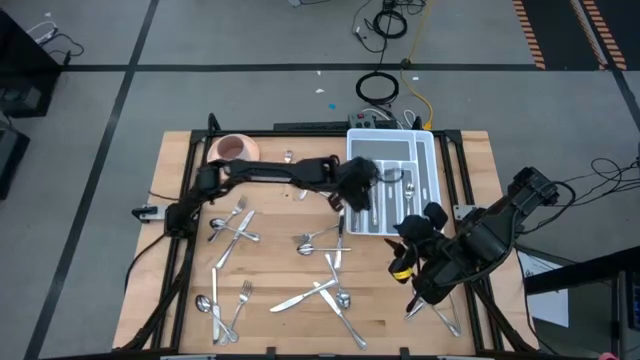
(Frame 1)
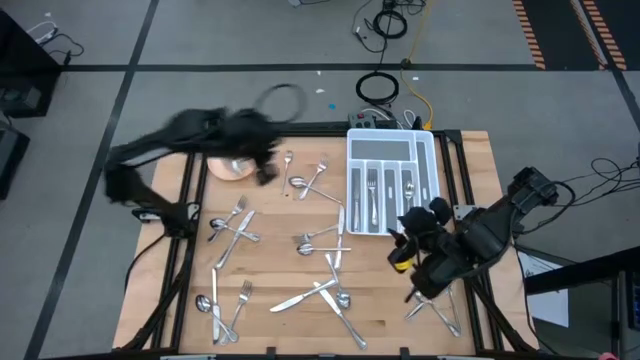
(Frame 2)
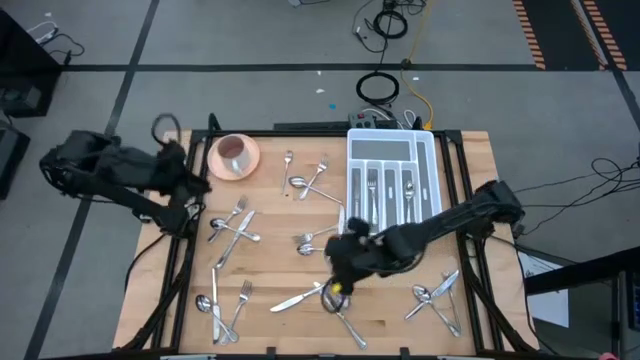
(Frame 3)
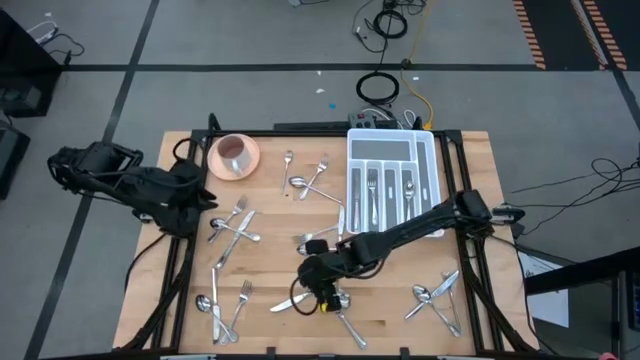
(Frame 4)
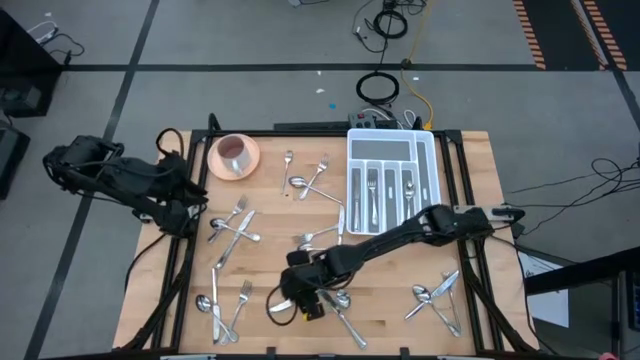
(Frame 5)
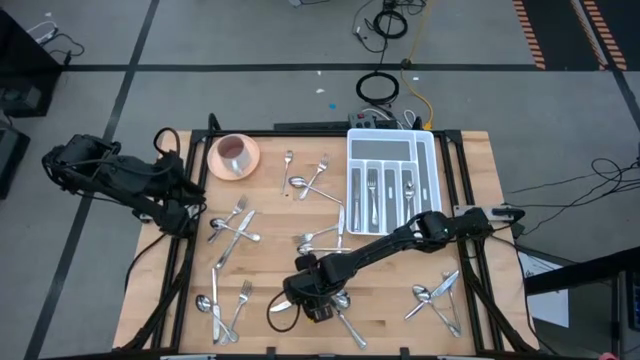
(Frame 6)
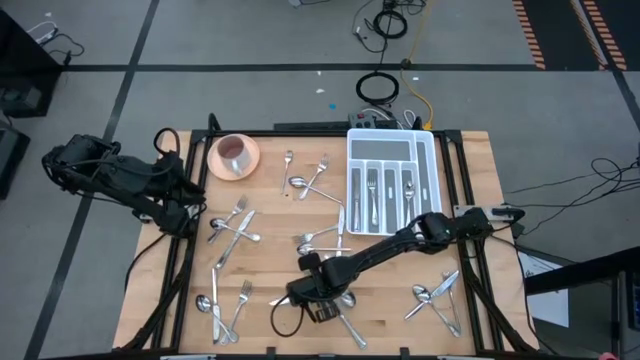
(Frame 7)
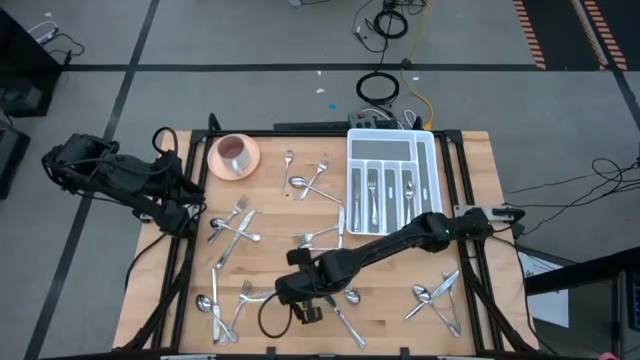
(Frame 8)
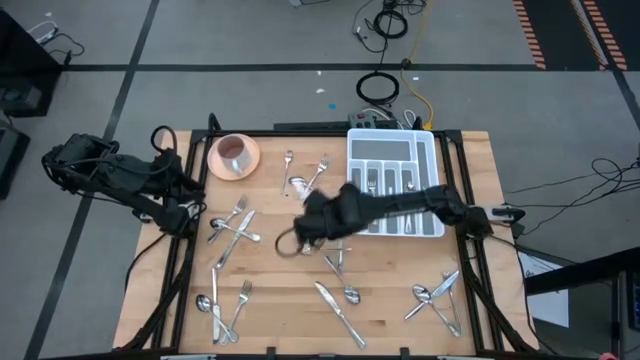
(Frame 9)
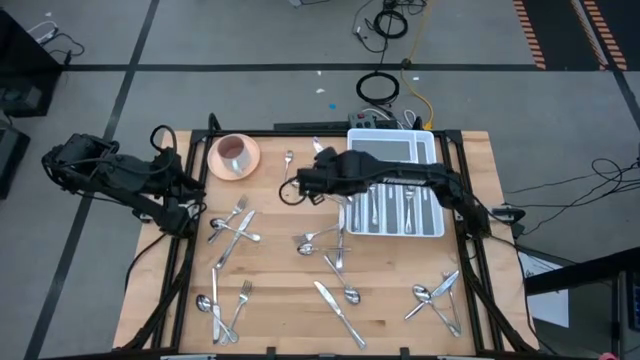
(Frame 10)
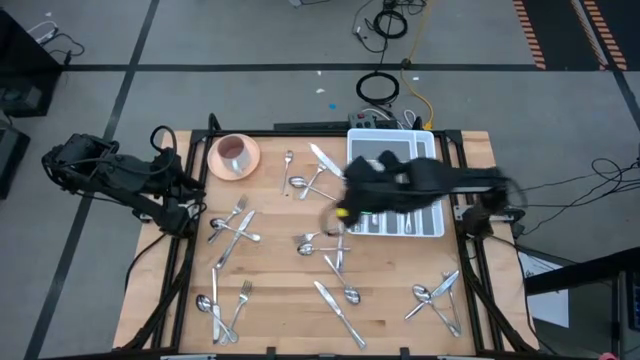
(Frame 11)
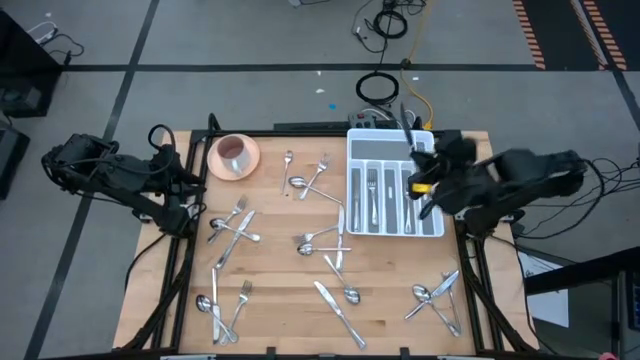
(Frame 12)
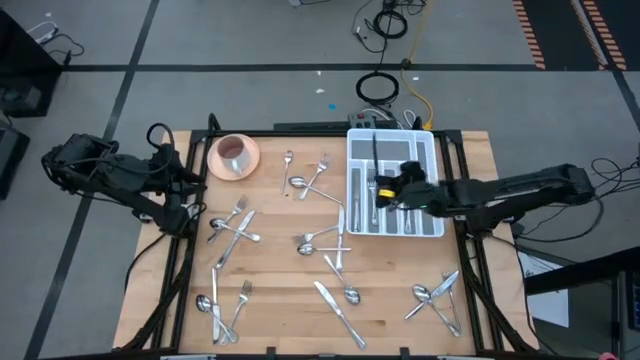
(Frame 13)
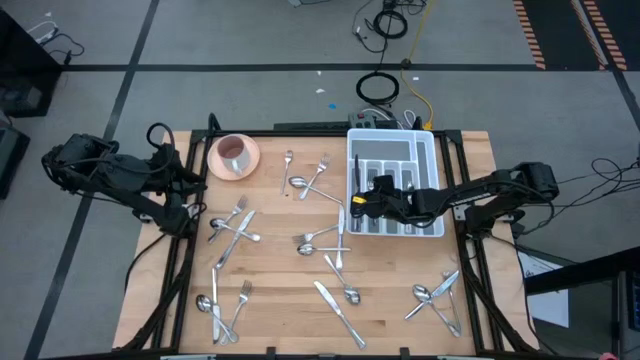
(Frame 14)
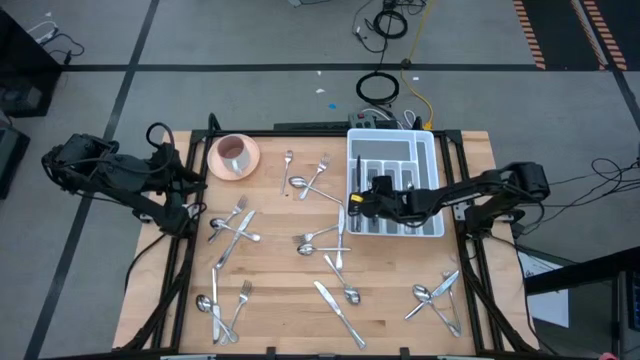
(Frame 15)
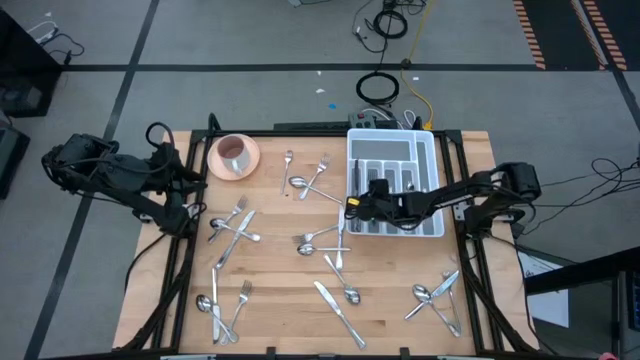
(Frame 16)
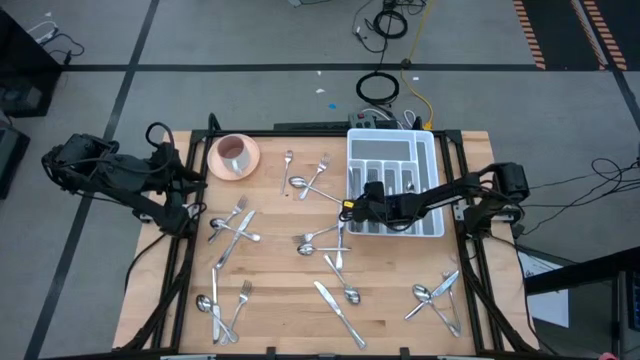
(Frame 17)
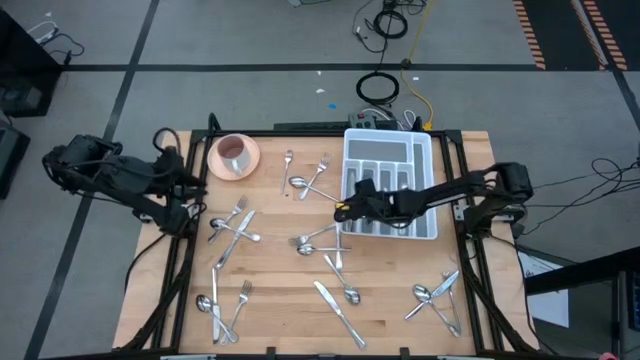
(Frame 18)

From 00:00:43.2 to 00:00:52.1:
Task: Sort silverware
Put the silver knife into the white silverware tray

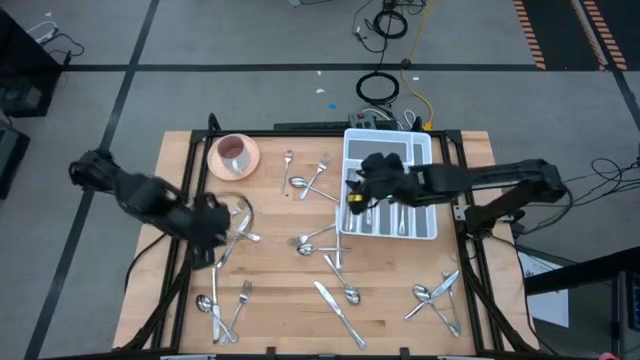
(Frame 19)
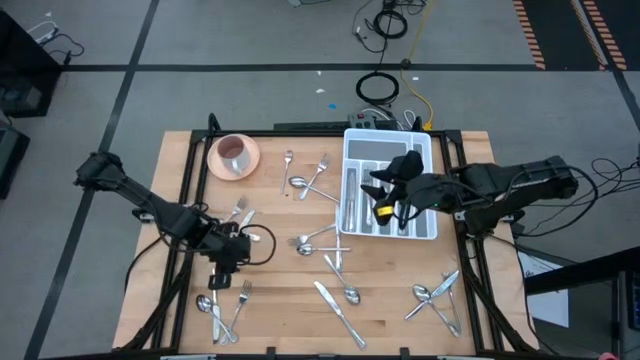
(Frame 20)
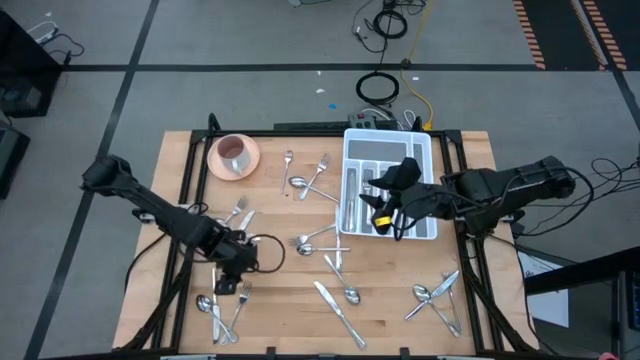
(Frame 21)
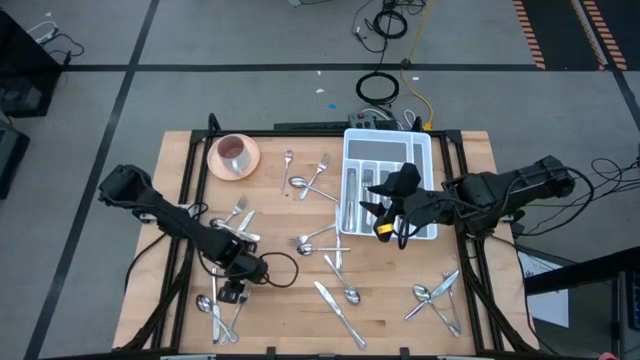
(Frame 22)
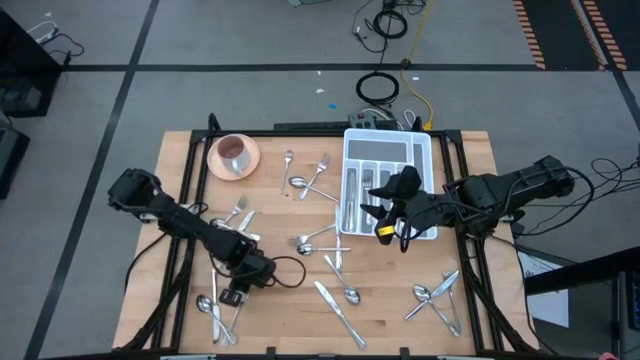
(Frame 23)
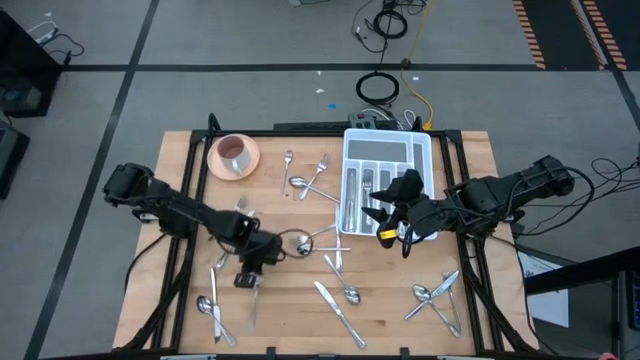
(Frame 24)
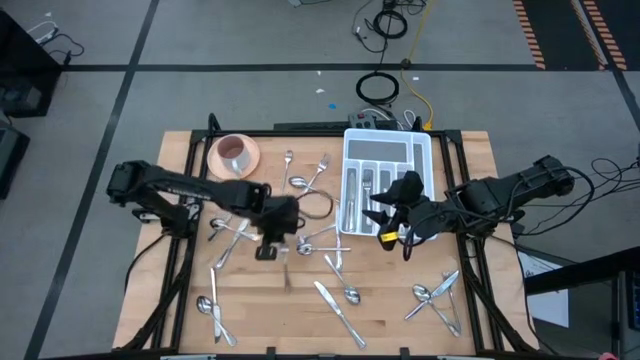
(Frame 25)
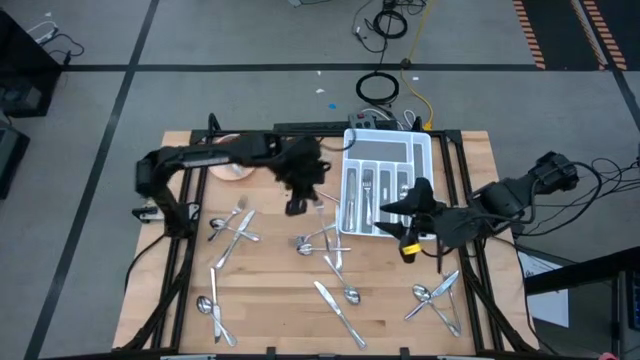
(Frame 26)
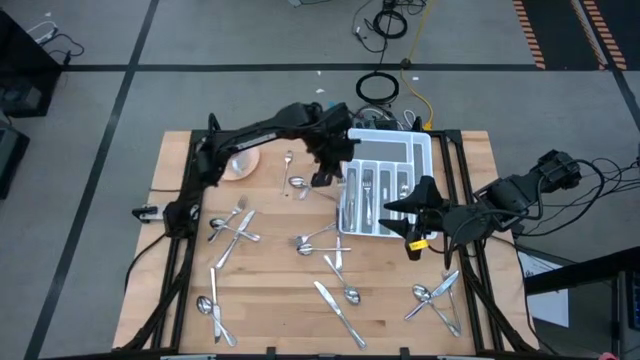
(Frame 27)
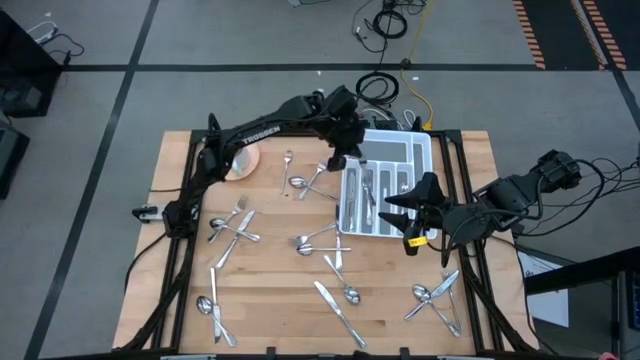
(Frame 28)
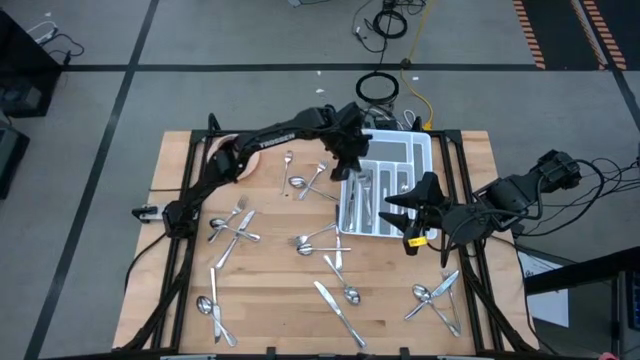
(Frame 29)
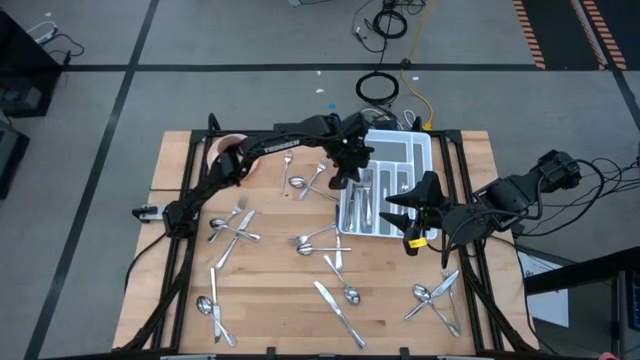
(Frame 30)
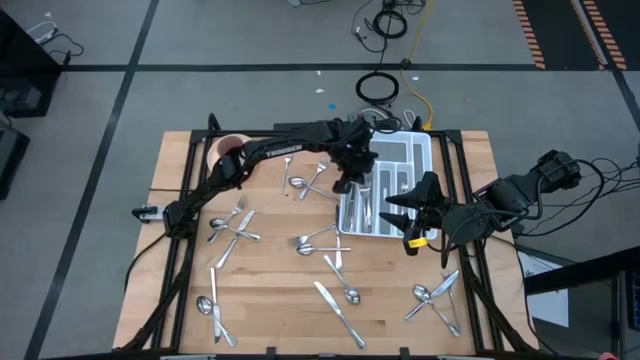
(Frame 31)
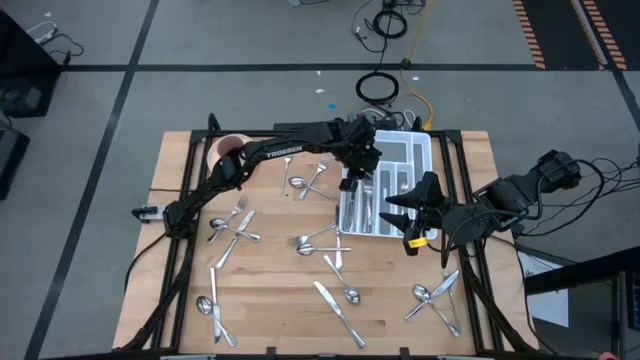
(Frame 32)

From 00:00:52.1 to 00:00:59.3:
Put the silver fork into the white silverware tray

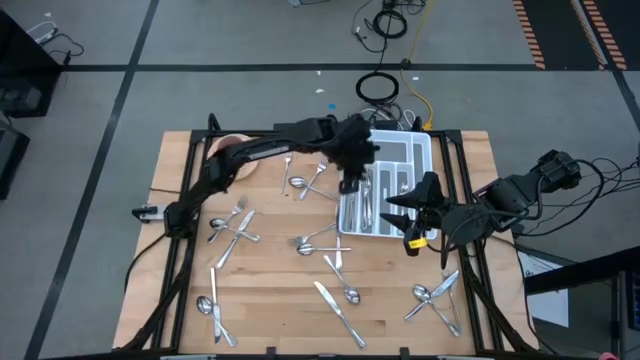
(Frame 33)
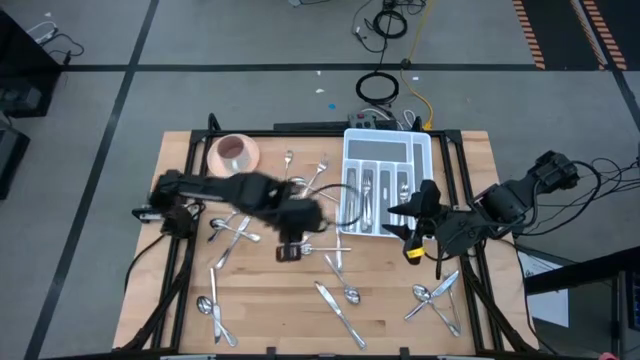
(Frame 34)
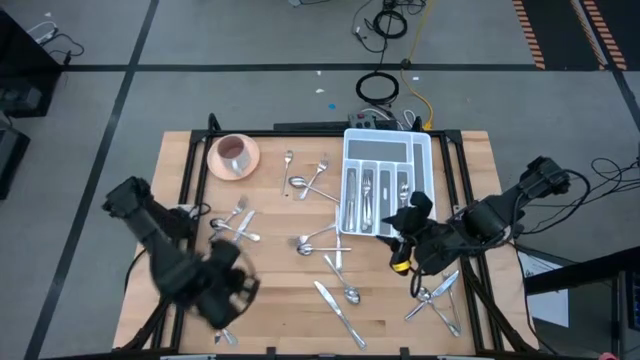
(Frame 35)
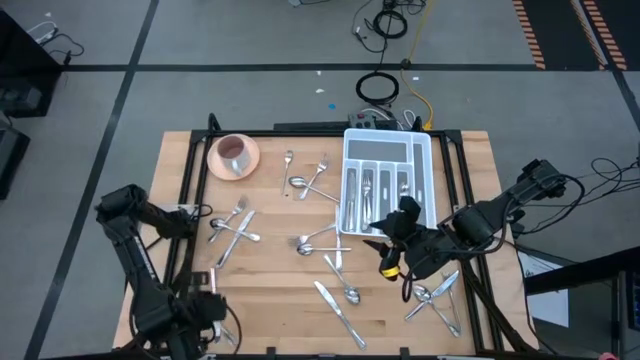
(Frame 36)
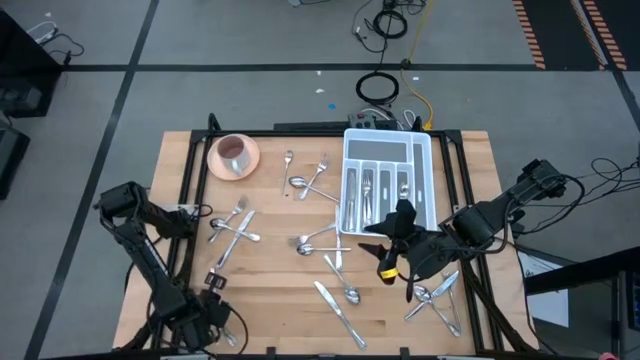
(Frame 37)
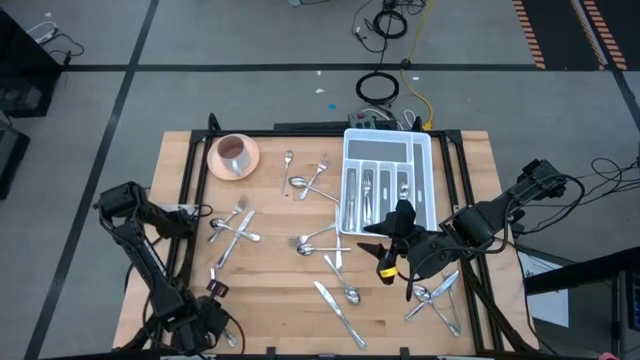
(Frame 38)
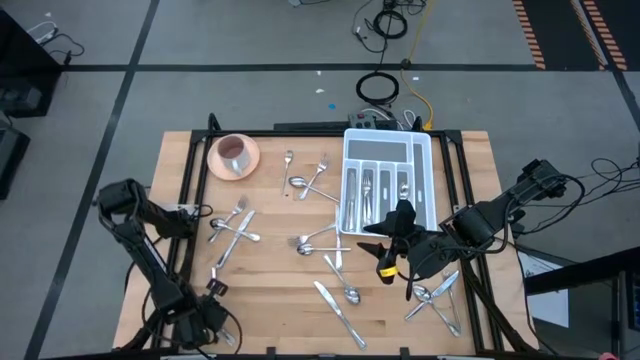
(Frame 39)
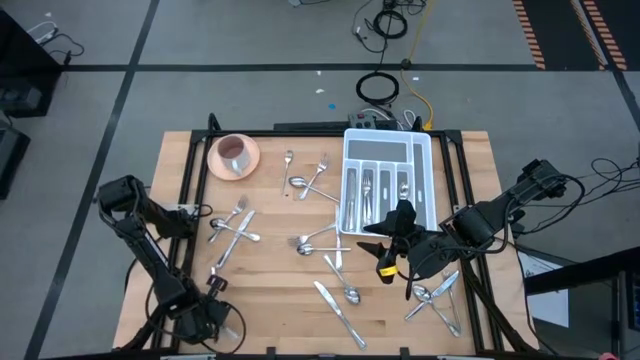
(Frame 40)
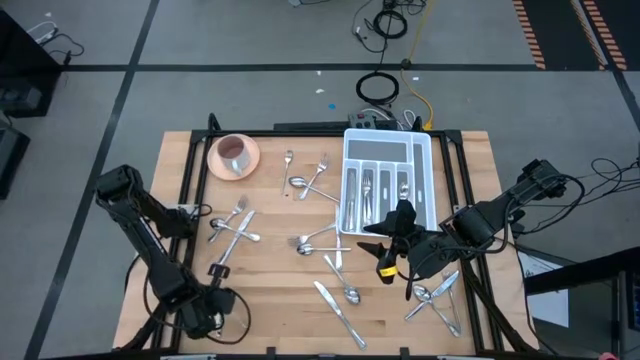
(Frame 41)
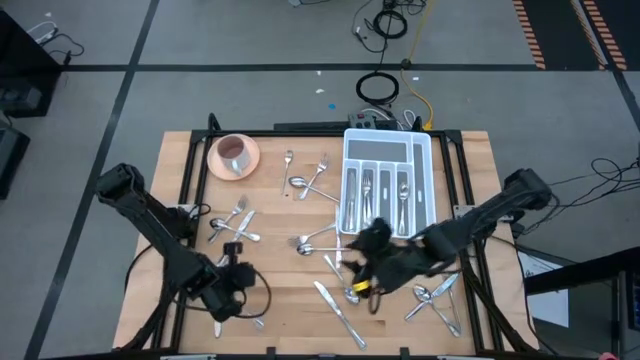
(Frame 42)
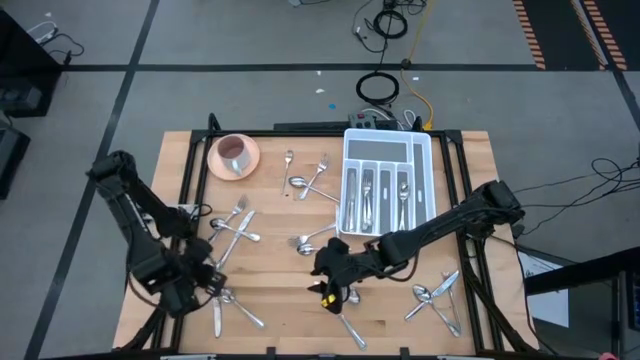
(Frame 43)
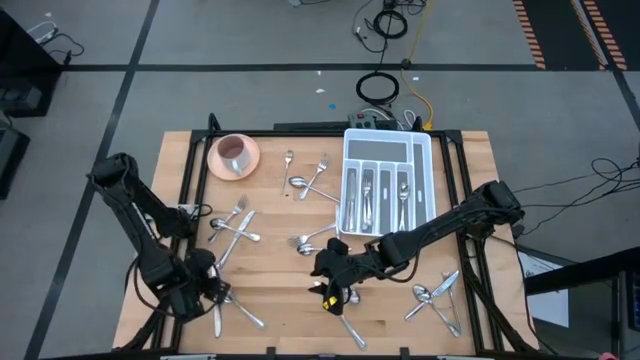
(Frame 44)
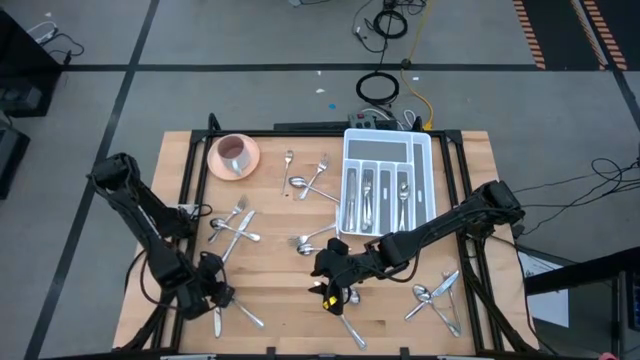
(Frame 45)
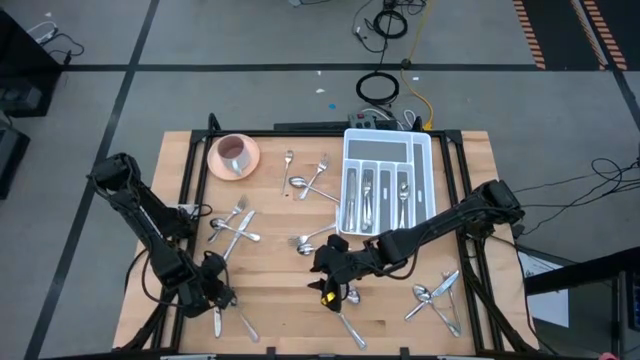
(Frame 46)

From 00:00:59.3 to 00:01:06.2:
Put the silver spoon into the white silverware tray
